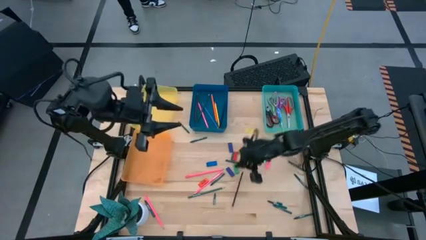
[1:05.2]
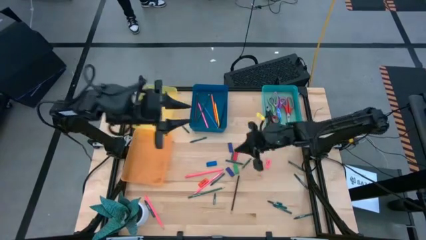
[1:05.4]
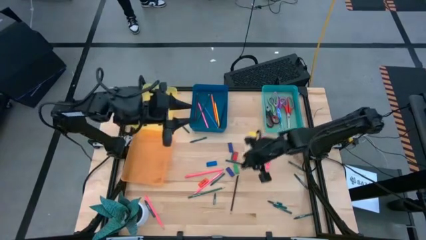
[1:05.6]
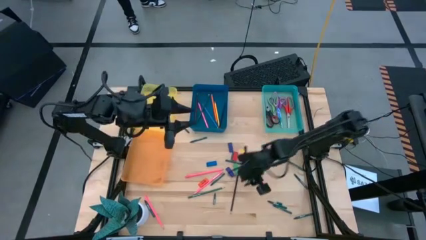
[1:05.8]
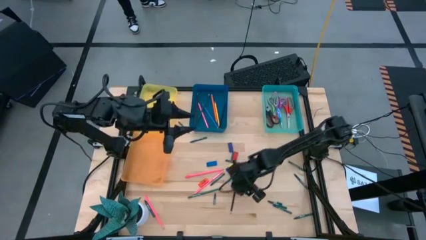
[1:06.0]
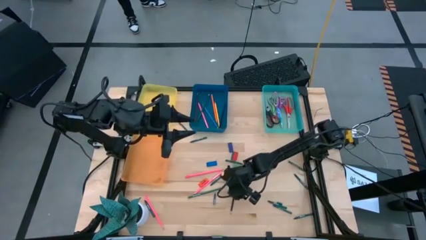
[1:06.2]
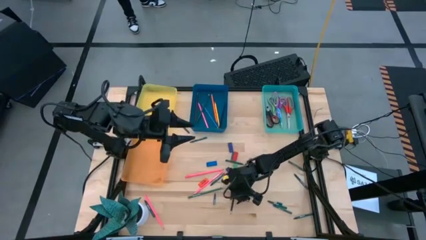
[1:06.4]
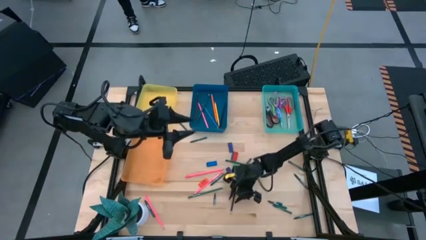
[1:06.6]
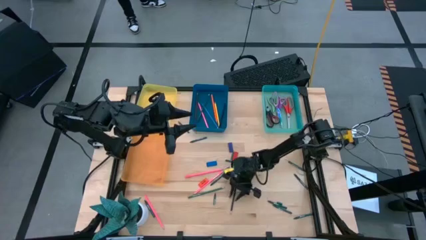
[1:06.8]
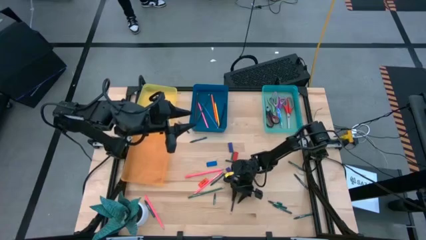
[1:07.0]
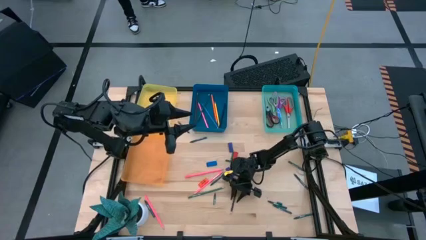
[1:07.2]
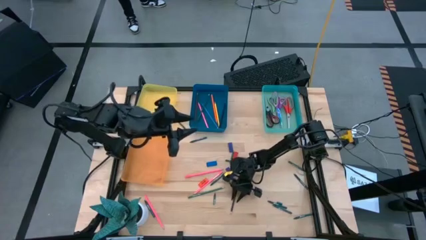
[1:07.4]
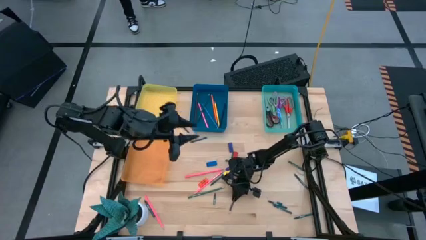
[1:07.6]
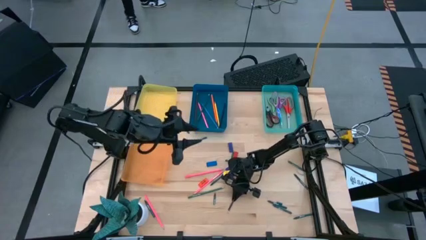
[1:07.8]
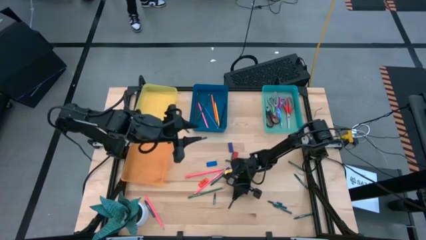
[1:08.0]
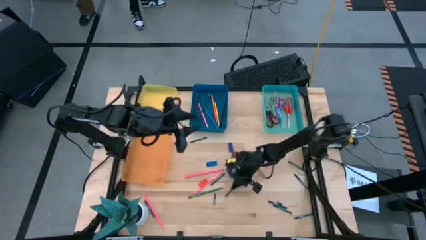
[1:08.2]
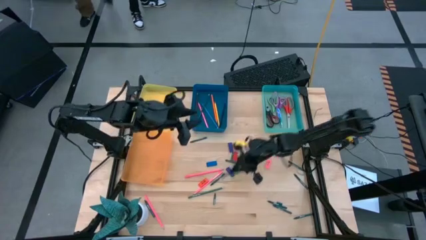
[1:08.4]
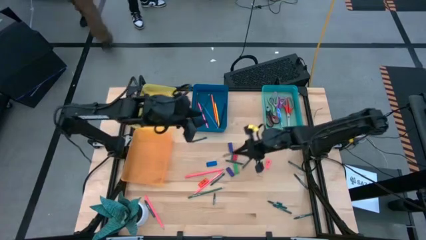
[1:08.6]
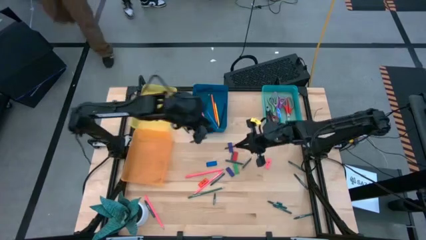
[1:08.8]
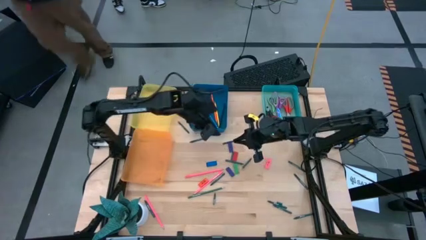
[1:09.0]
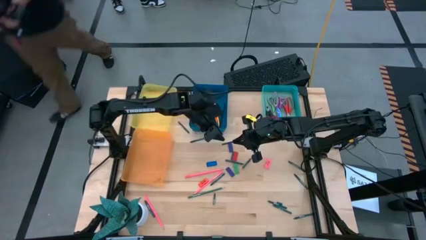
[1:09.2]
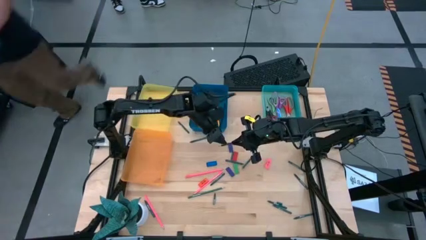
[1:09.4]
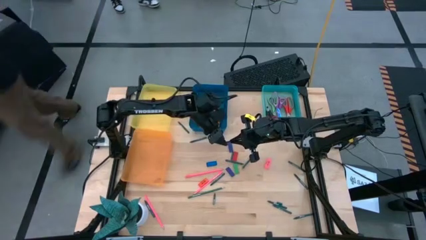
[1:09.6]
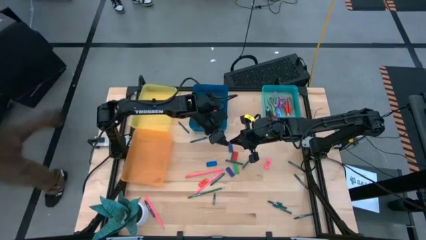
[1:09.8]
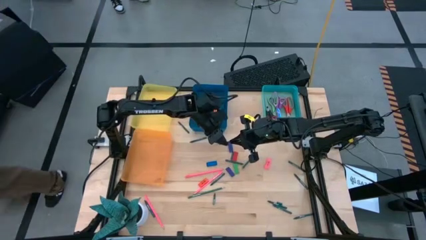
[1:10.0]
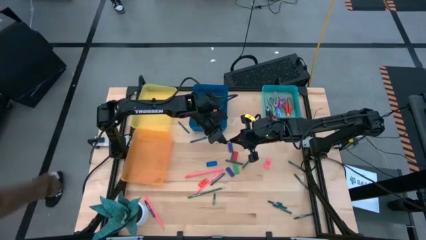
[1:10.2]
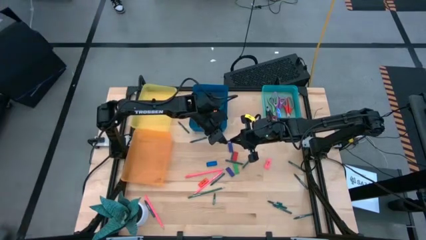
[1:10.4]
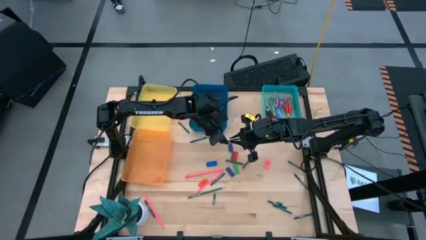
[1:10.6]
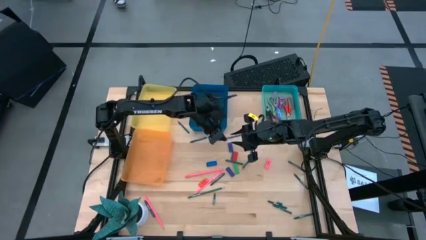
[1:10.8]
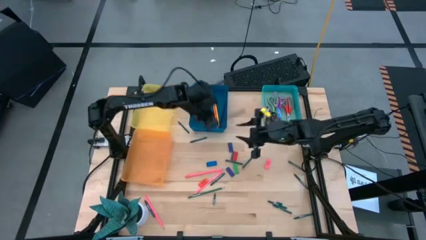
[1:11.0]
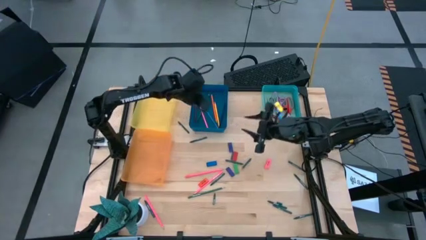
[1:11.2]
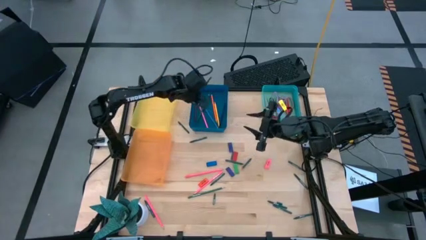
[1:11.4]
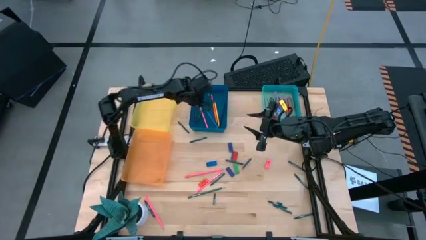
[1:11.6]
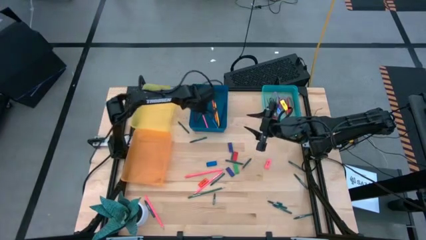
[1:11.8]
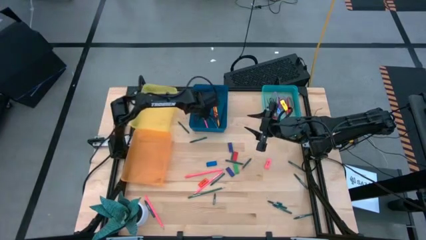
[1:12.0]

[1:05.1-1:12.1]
Task: Sort crayons/erasers/pens/pencils in bins
Put the dark blue pencil into the blue bin

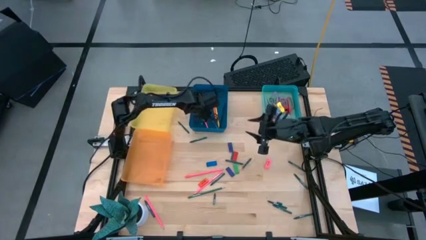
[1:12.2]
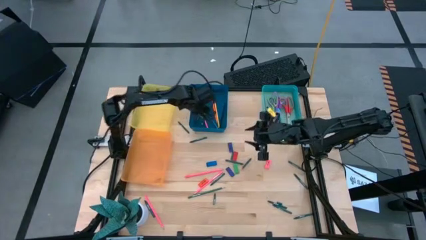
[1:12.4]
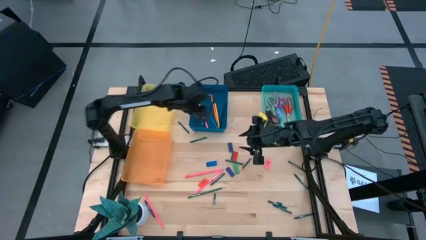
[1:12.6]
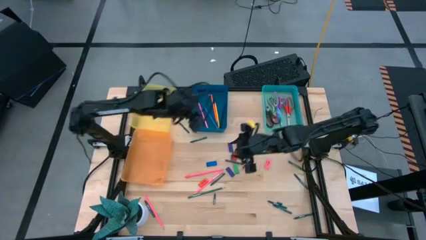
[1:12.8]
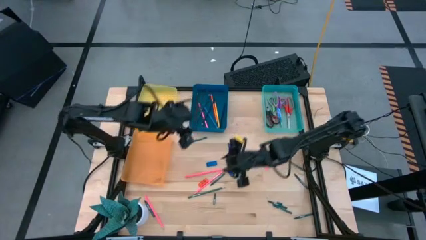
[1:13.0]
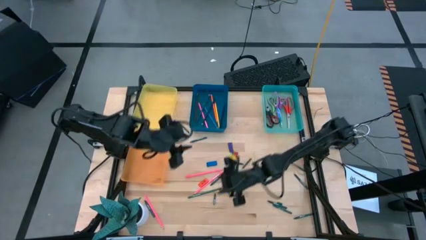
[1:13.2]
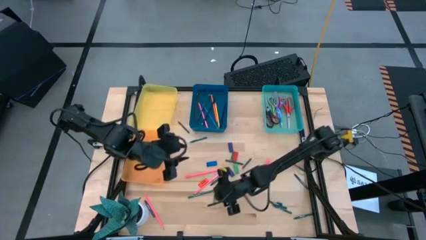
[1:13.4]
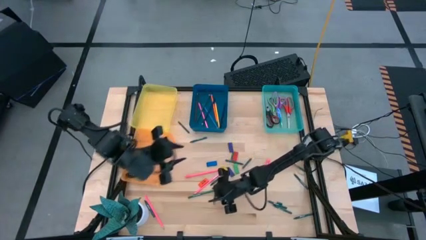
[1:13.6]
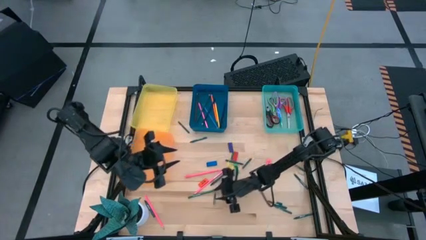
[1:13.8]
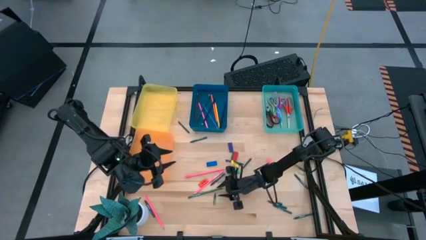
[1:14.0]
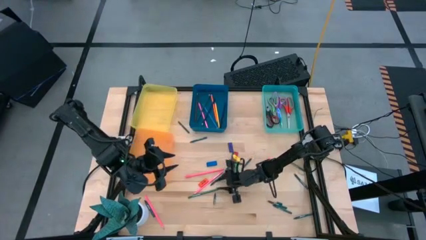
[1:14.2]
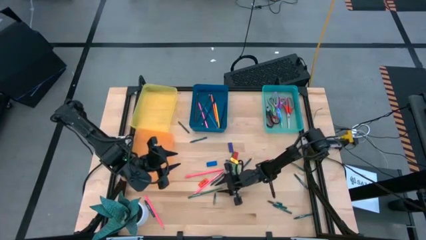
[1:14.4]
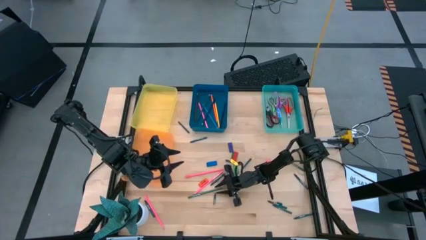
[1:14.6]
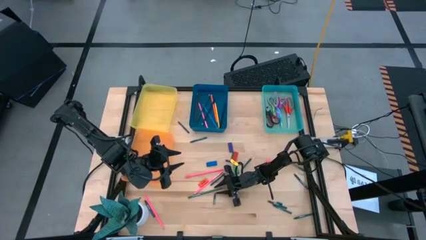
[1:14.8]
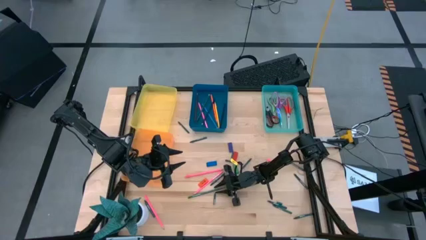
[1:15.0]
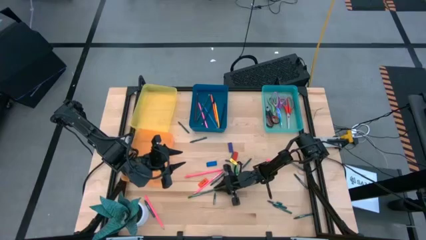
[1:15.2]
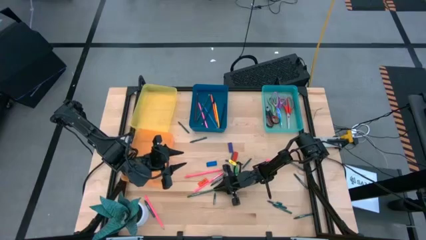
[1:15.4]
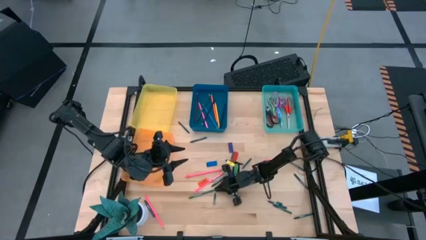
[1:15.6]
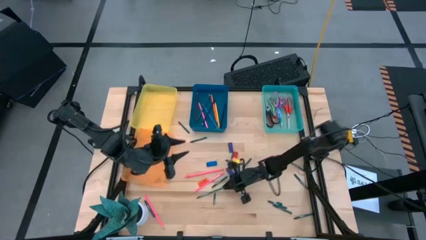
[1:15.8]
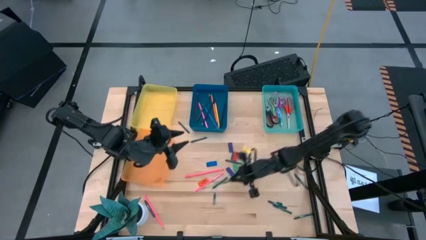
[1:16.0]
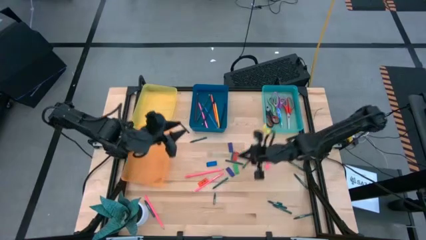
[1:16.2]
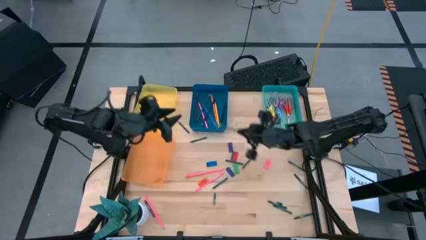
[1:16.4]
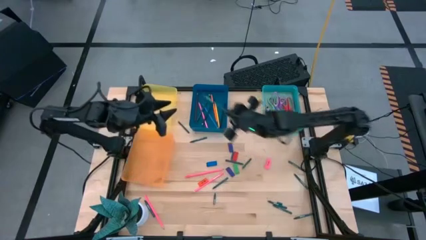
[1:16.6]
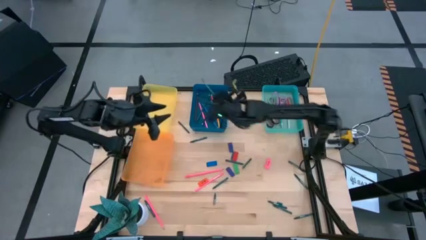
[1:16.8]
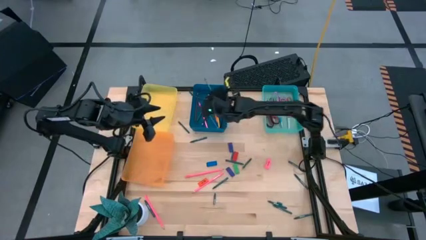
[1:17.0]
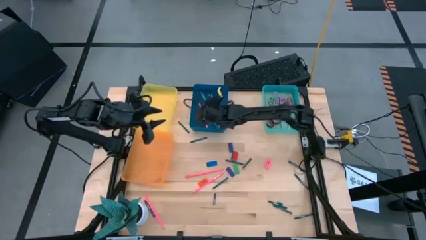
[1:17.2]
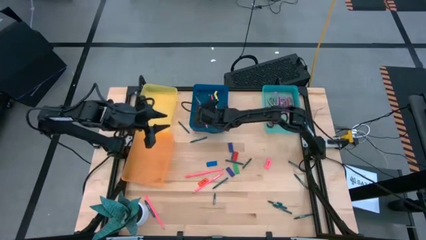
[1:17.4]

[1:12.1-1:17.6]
Put the green pencil into the blue bin

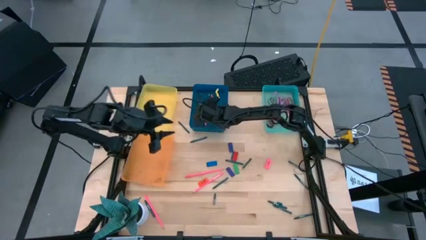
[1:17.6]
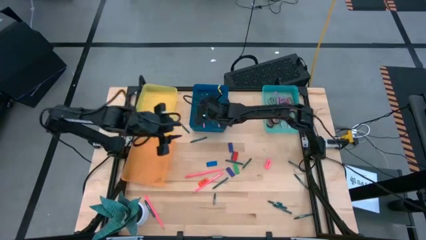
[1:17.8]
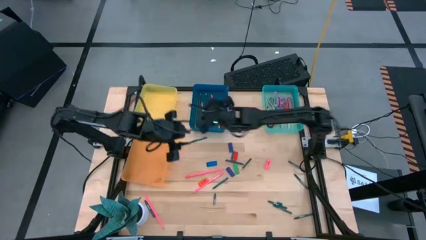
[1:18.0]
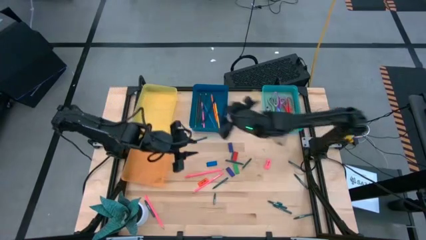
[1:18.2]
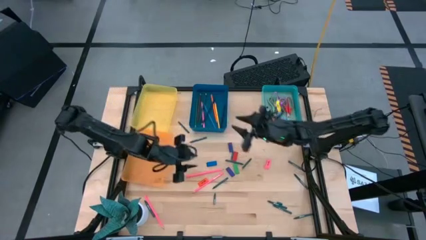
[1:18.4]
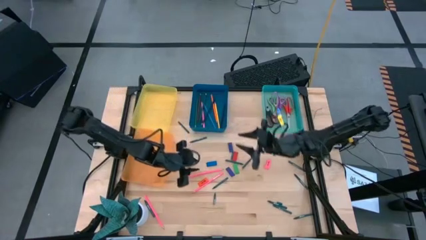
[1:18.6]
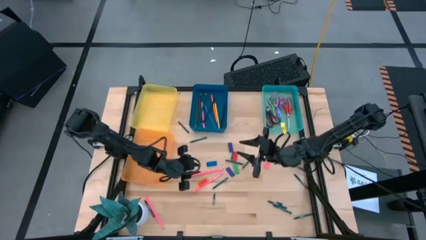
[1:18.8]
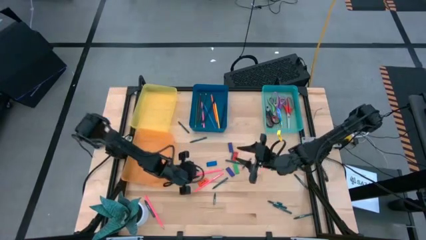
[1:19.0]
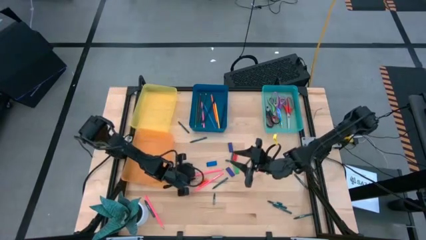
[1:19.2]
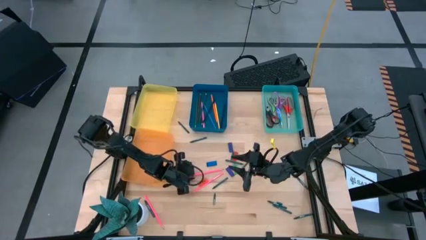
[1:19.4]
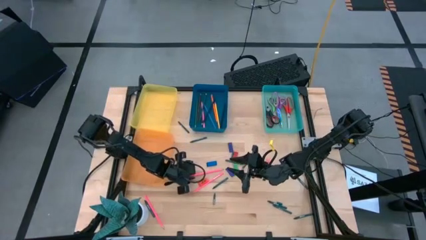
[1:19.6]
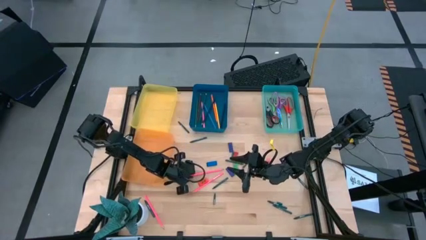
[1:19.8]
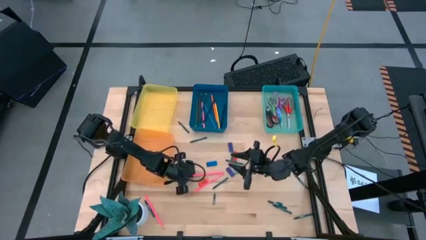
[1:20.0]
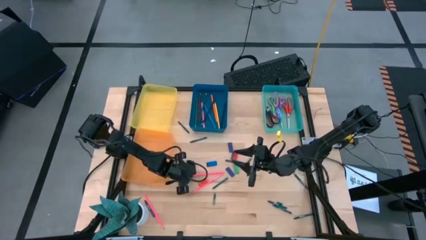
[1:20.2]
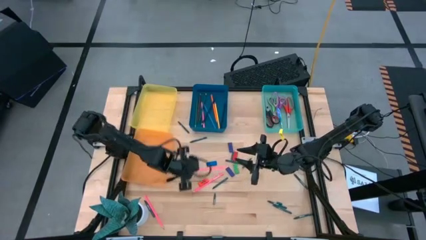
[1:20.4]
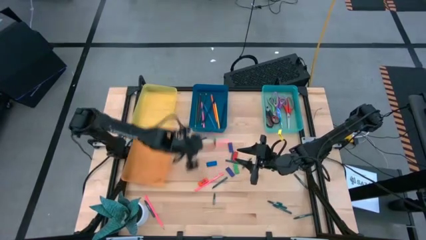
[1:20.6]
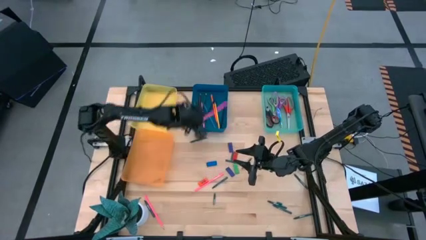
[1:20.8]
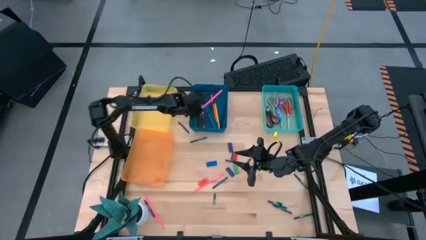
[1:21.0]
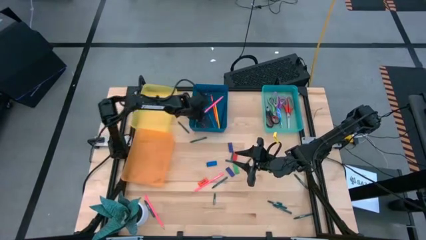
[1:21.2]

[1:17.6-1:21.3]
Put the top pink pencil into the blue bin

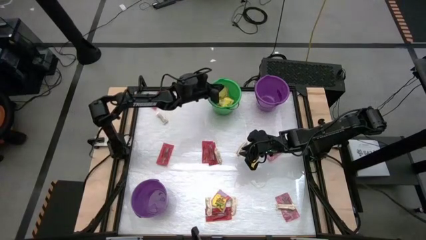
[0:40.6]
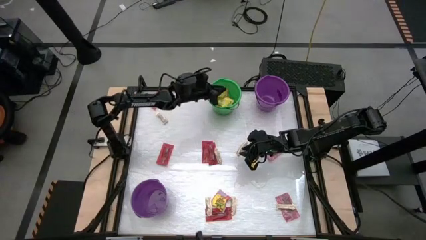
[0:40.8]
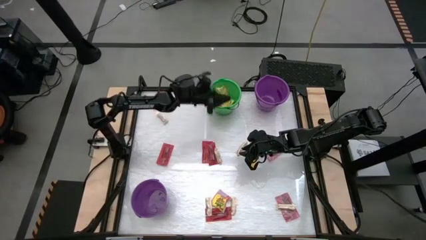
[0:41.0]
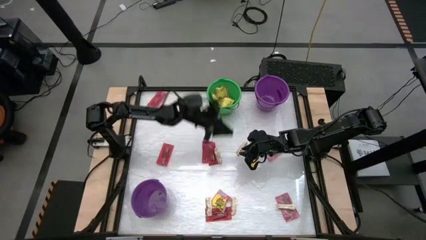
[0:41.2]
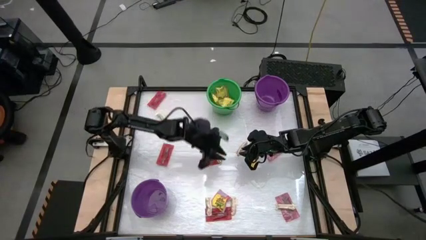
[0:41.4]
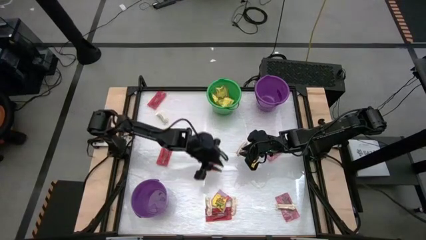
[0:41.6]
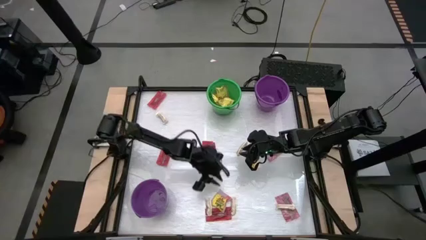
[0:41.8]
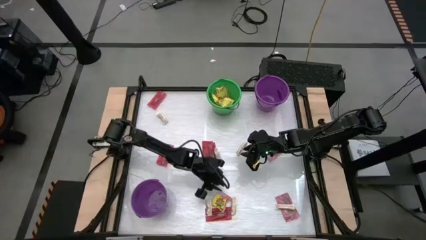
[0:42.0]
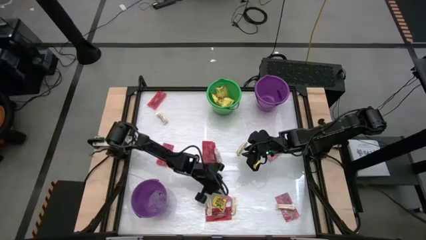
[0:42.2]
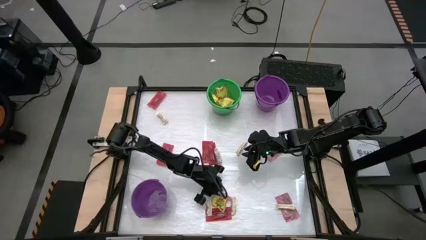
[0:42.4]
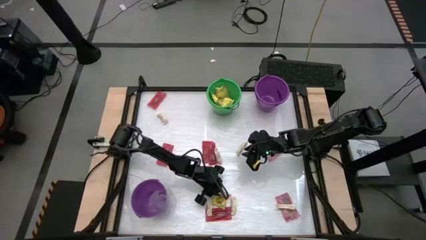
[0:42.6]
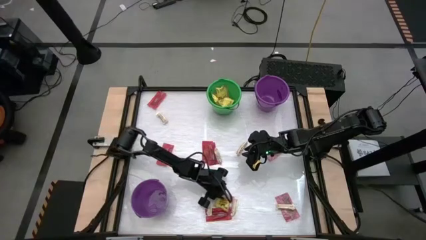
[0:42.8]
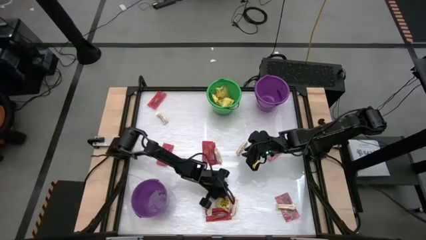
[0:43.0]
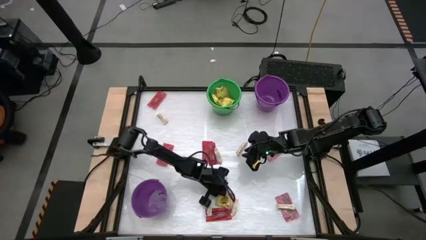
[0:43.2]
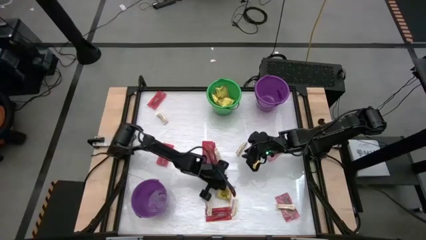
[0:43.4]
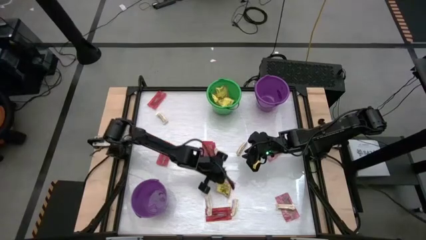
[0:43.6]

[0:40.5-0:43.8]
Task: Sort candy by brand, put in halloween buckets
Put the yellow candy into the green bucket
